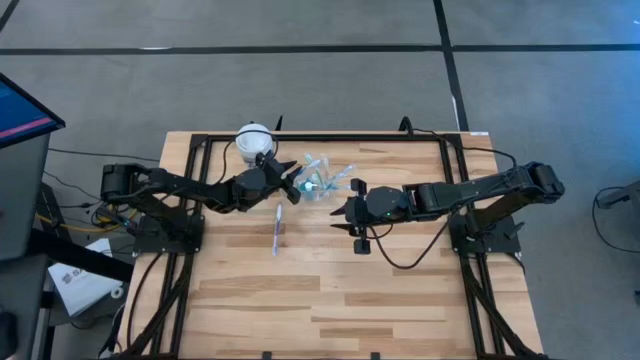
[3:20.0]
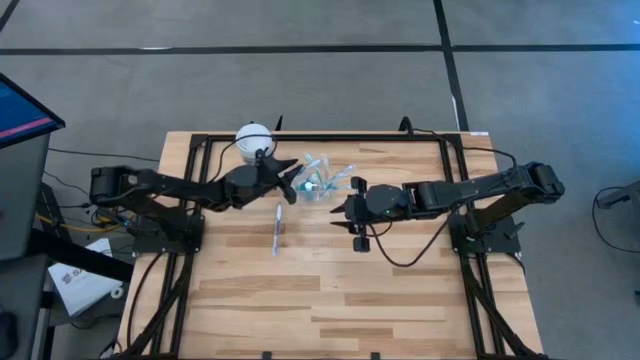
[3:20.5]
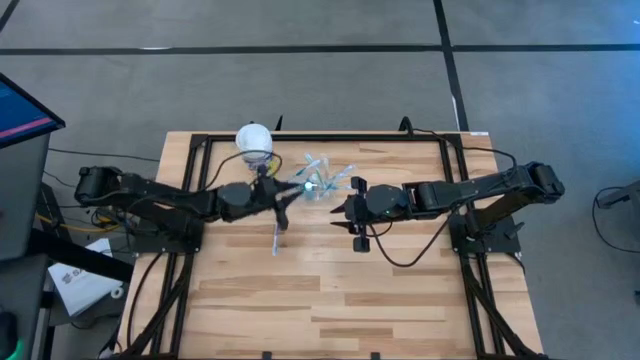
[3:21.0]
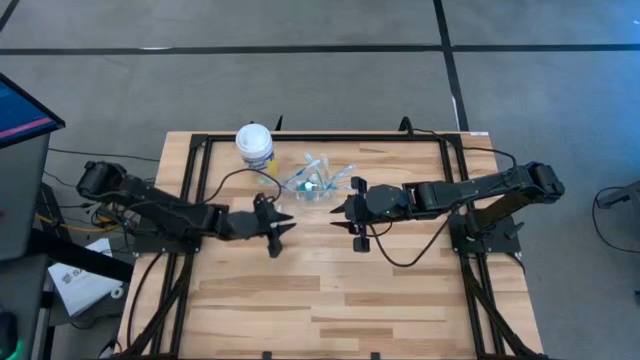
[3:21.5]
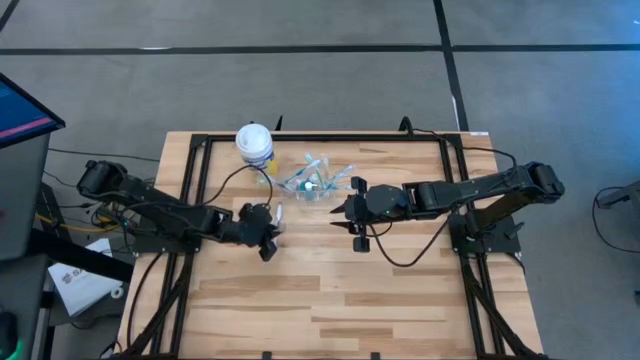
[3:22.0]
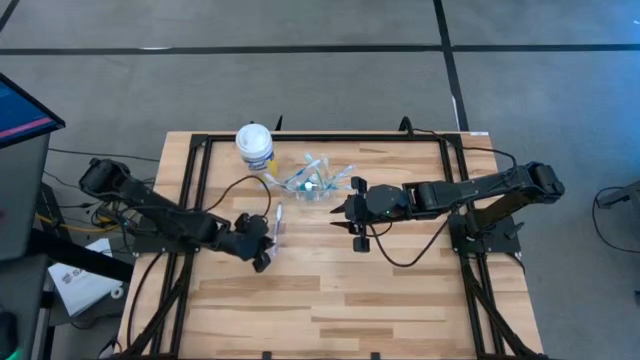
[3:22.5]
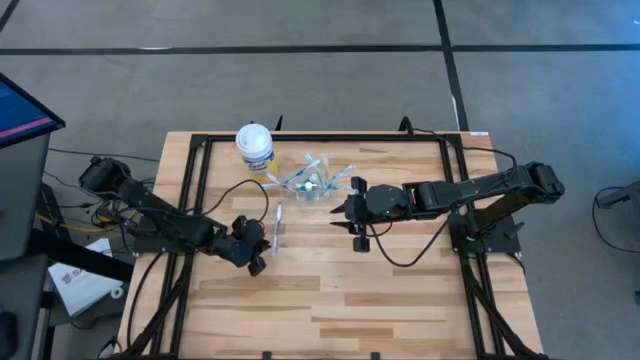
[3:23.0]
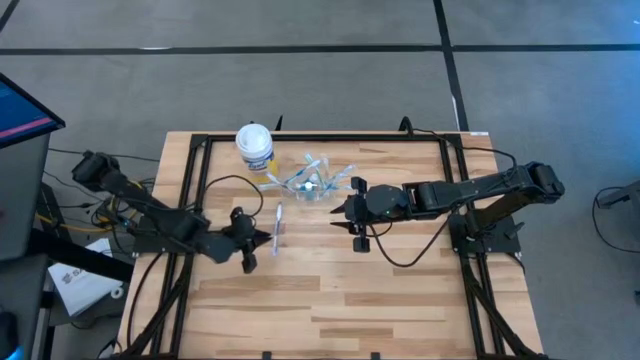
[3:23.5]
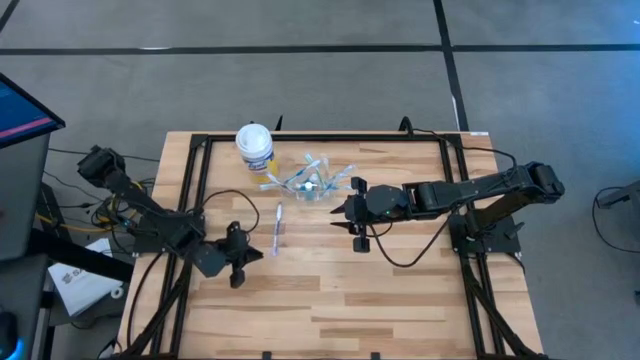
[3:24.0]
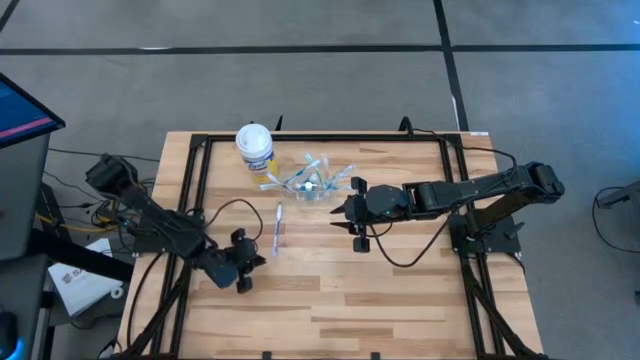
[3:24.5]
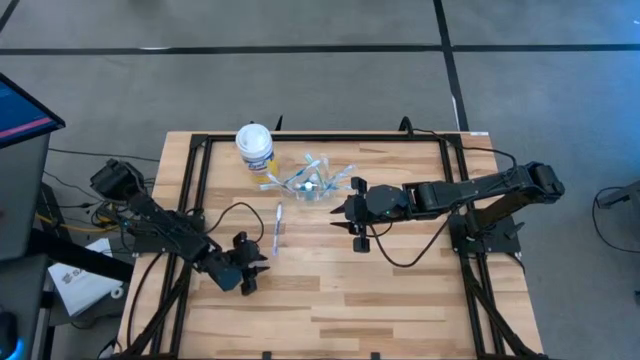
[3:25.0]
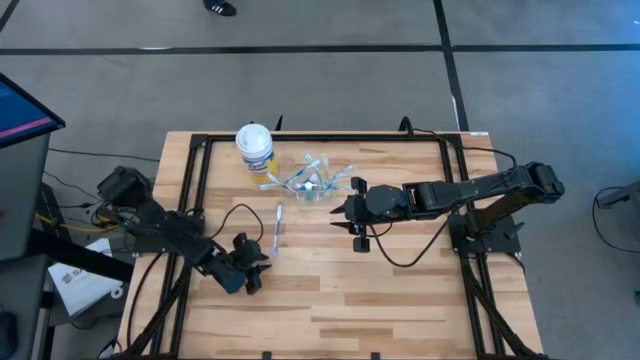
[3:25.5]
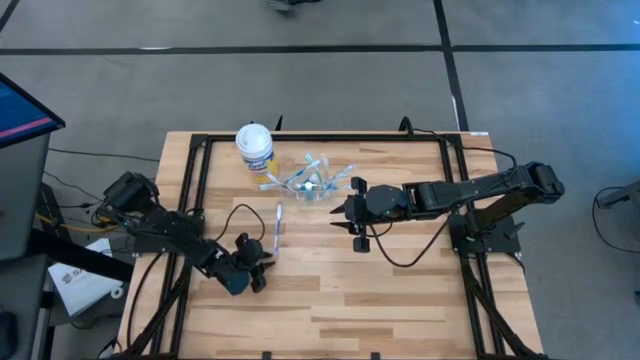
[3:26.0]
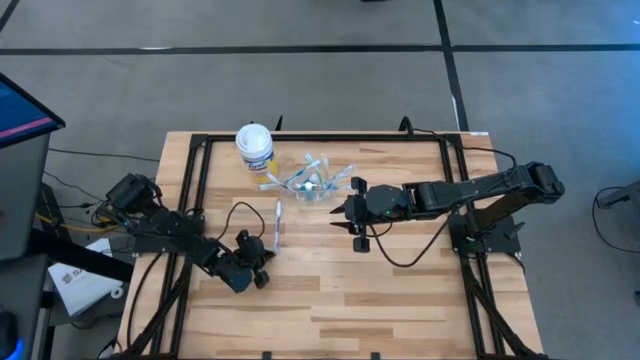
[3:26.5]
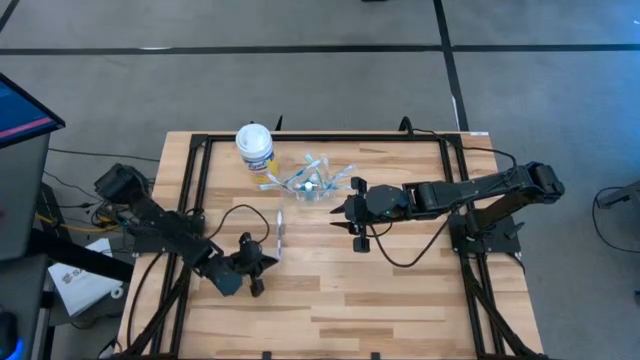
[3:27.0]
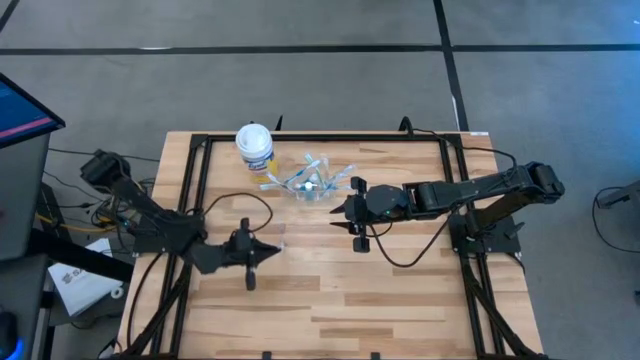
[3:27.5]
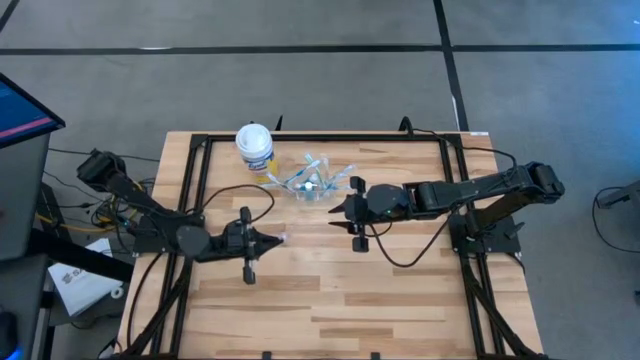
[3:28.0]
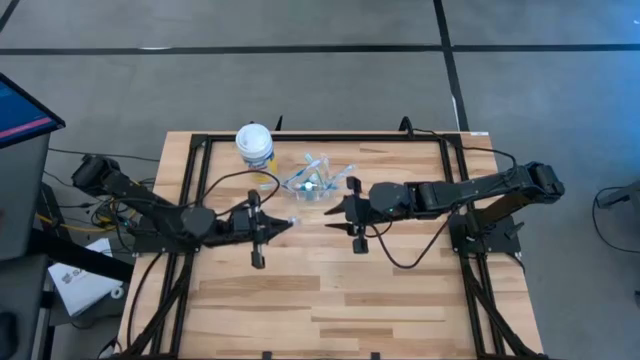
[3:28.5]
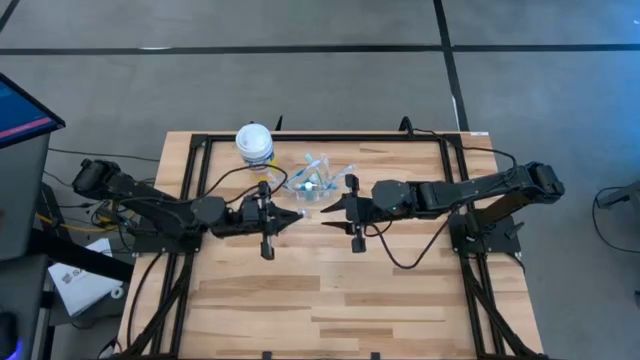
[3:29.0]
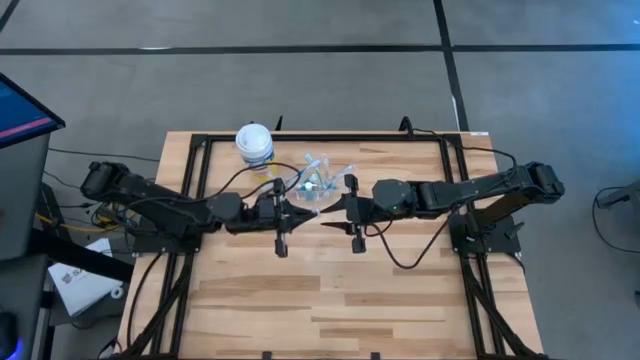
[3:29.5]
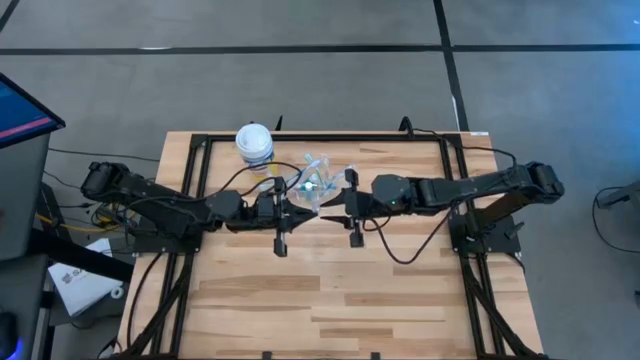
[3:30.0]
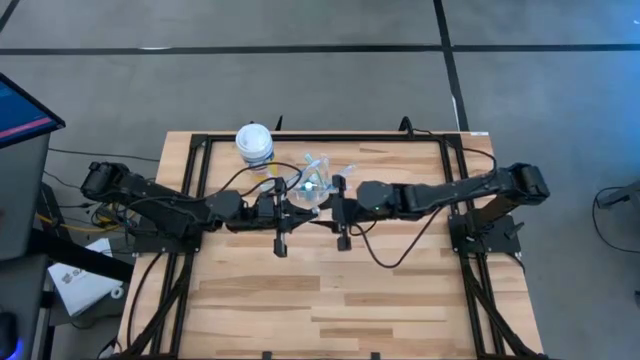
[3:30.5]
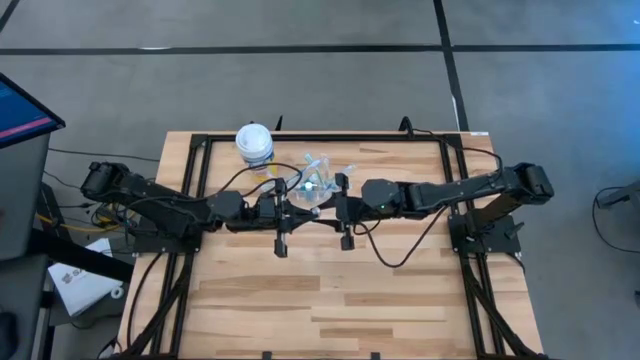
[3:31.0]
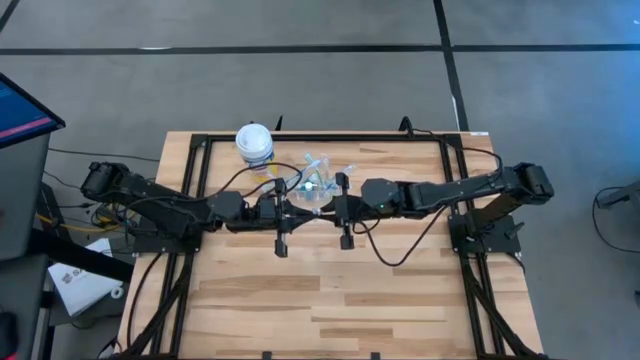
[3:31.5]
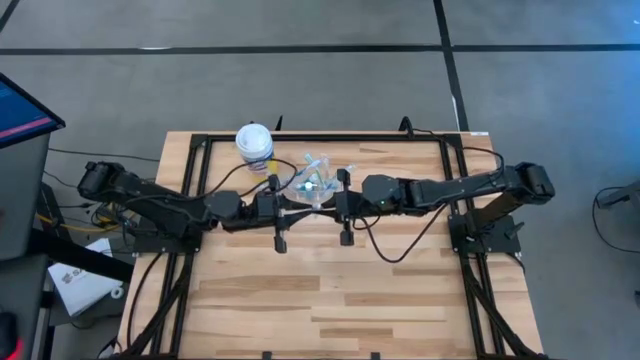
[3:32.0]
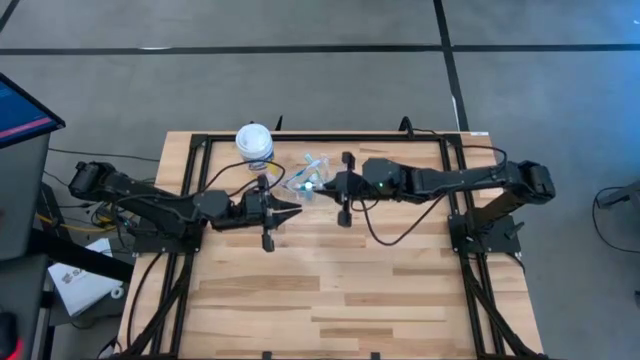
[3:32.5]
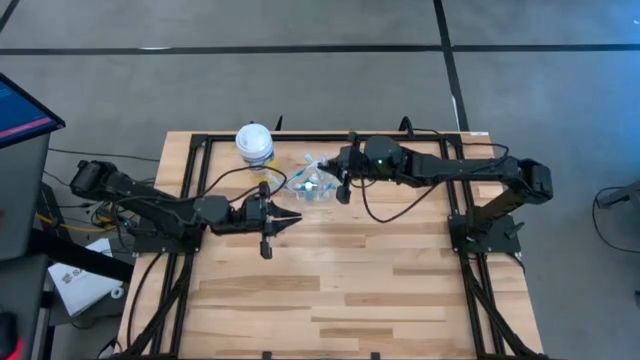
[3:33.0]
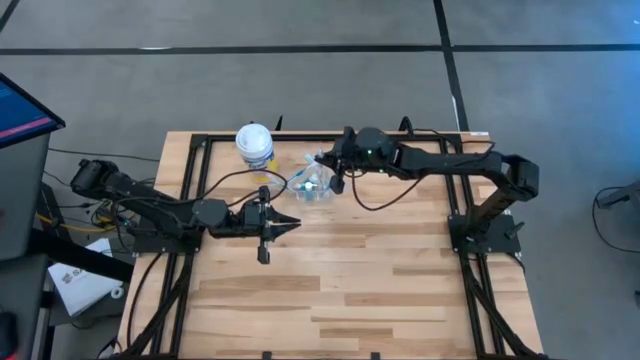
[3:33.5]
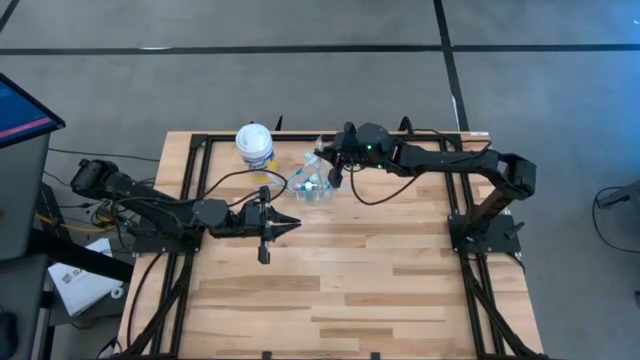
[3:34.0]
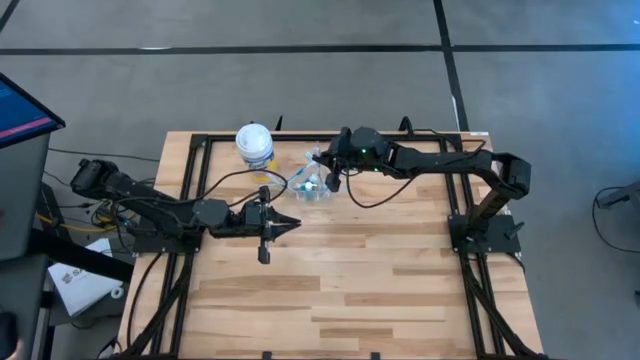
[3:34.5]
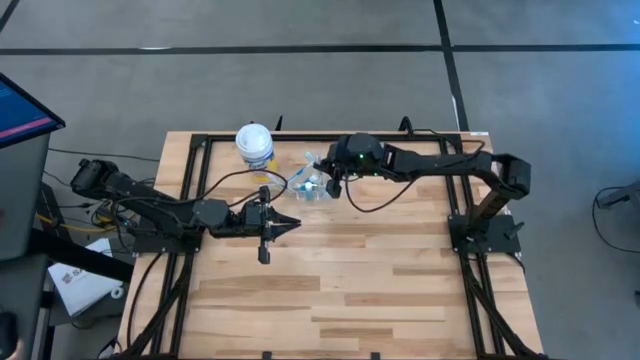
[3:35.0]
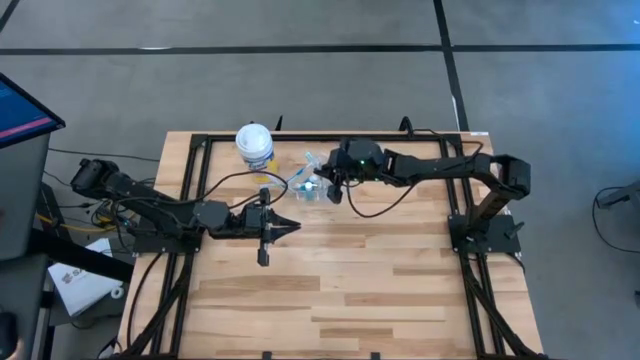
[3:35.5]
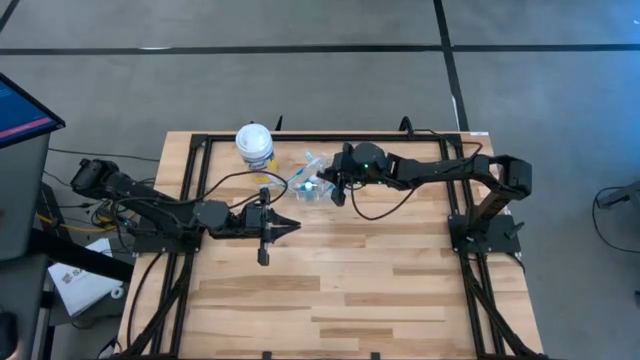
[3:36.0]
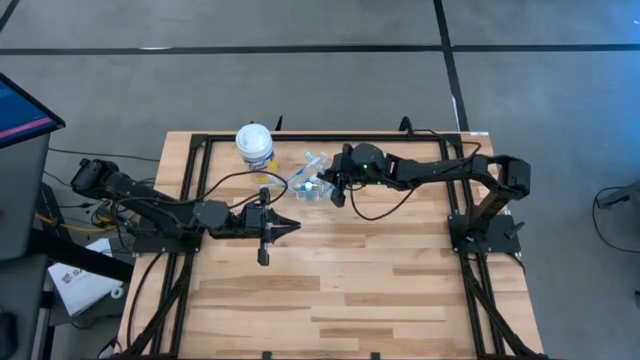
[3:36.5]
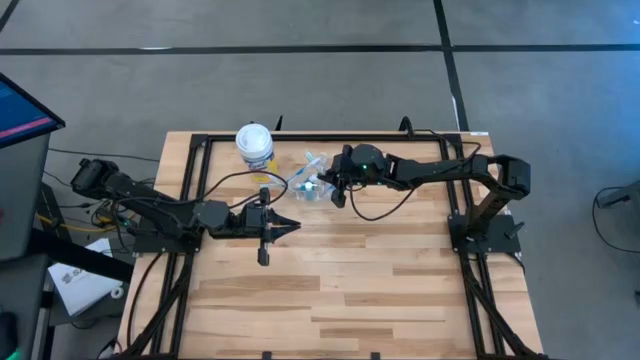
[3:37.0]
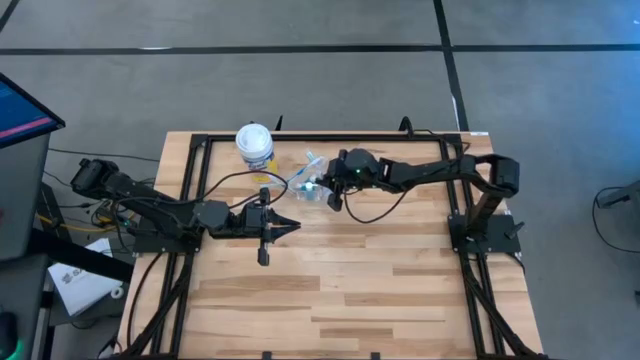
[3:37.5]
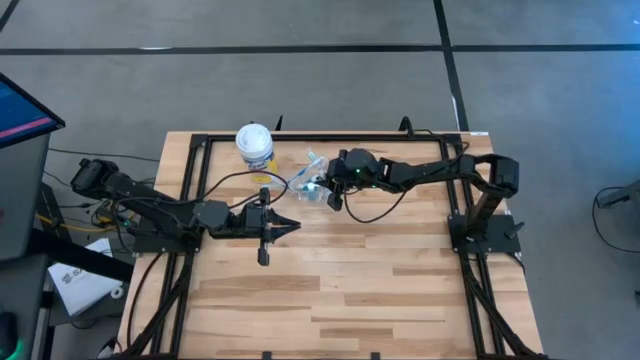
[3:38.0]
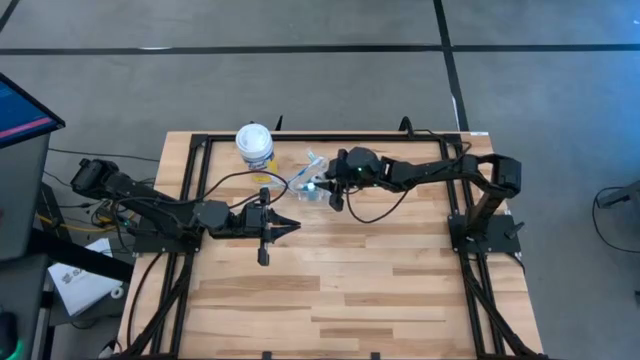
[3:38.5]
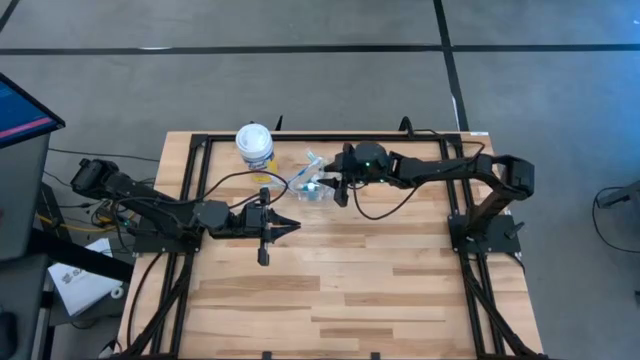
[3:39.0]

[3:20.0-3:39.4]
Task: Pick & Place toothbrushing station
Put the purple toothbrush into the transparent organizer

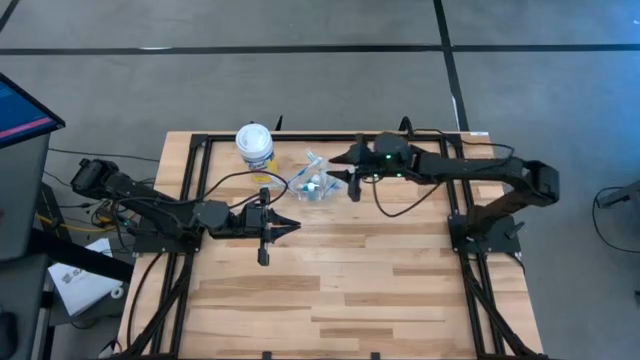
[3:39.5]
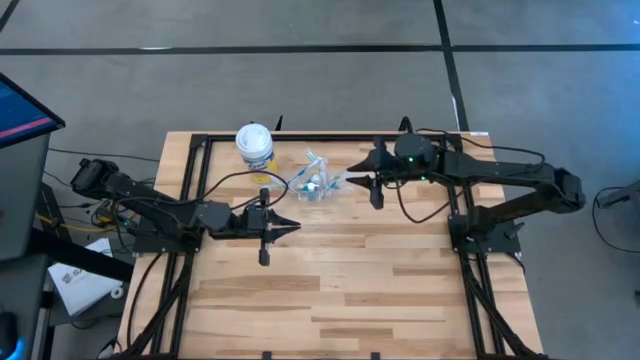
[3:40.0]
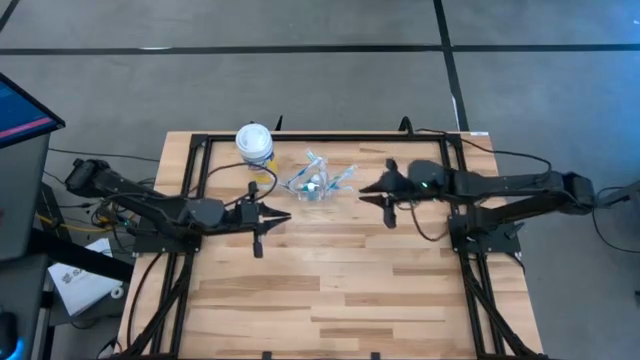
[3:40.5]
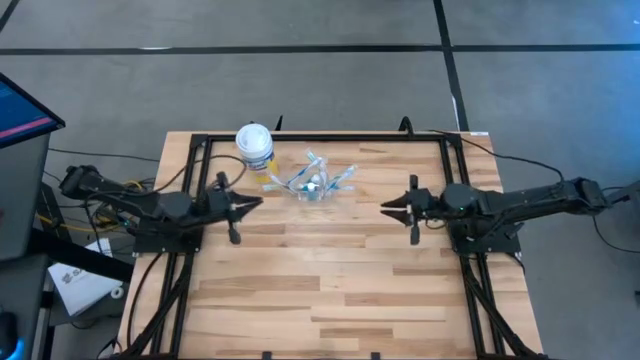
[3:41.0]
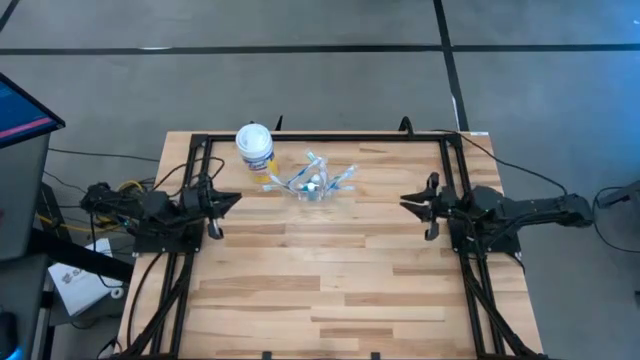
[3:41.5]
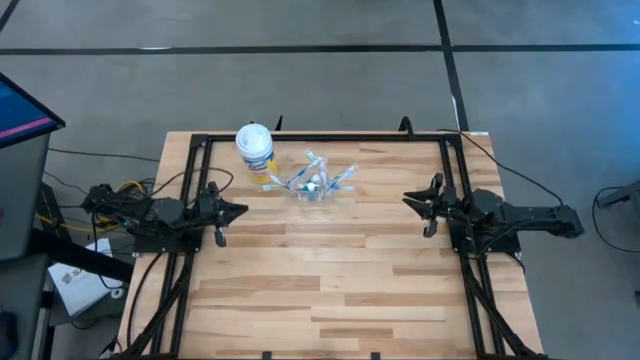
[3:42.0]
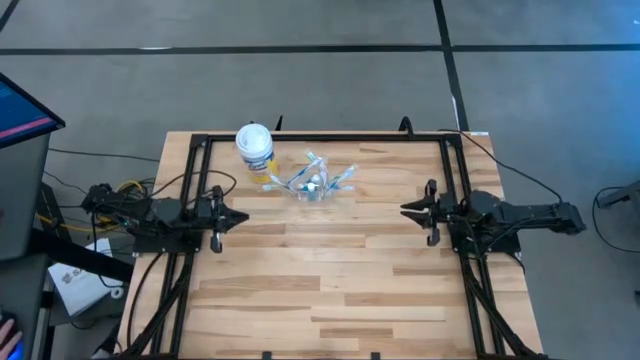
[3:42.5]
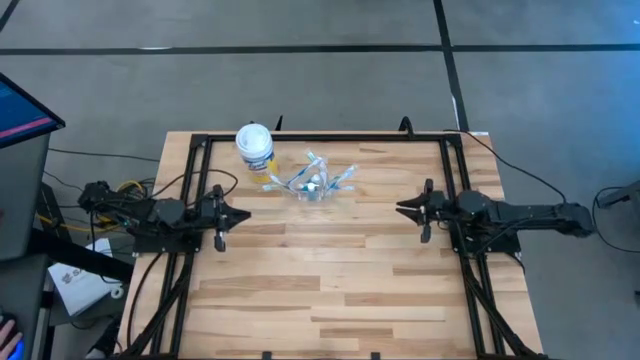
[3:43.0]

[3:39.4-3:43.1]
Return to Home Position
